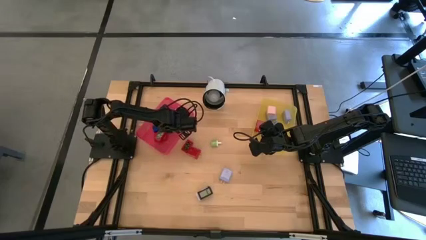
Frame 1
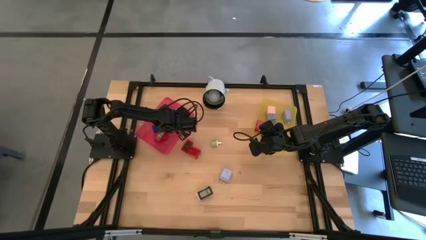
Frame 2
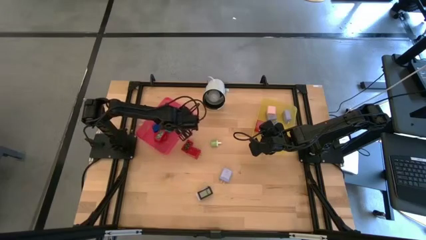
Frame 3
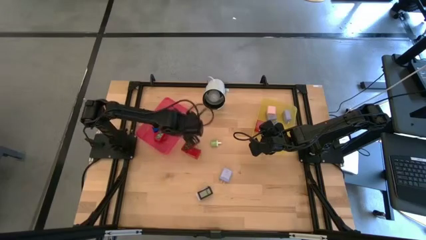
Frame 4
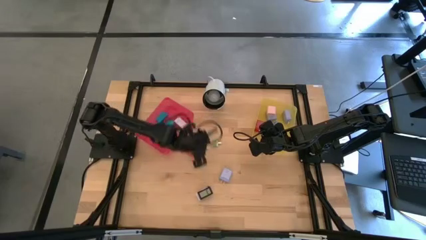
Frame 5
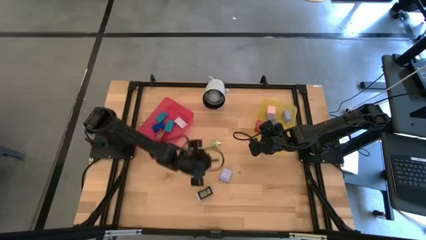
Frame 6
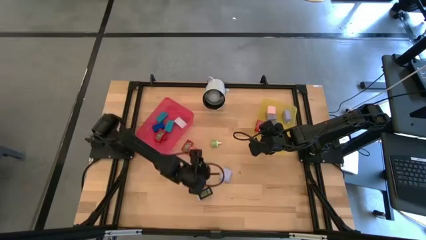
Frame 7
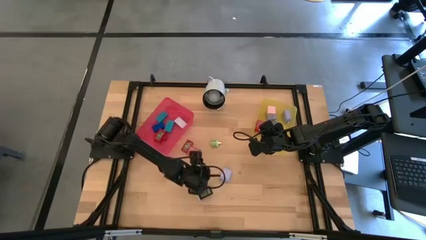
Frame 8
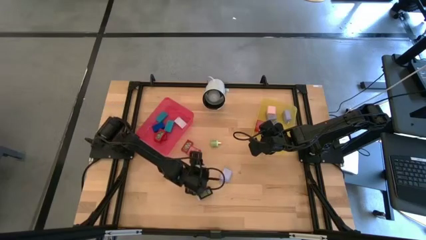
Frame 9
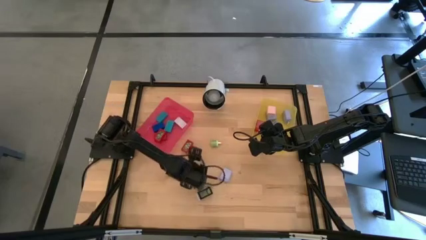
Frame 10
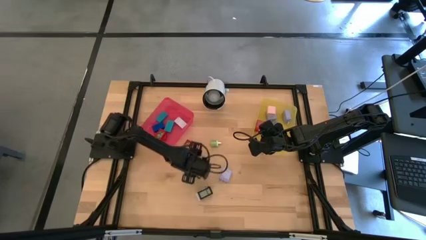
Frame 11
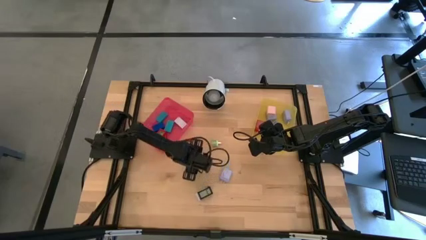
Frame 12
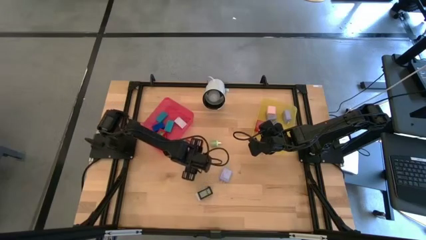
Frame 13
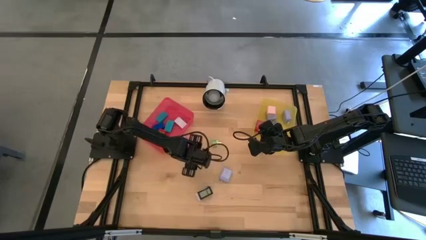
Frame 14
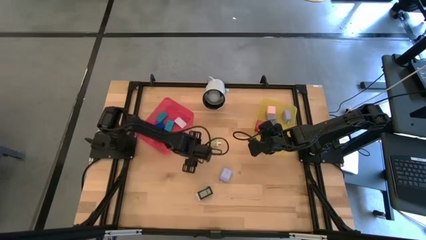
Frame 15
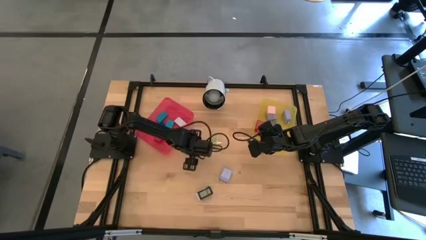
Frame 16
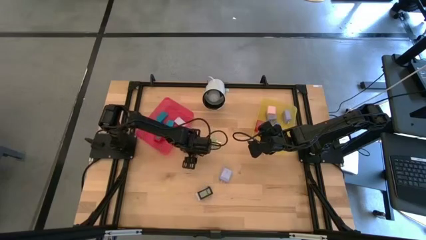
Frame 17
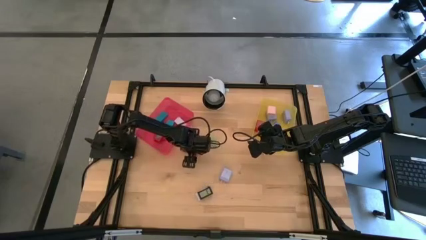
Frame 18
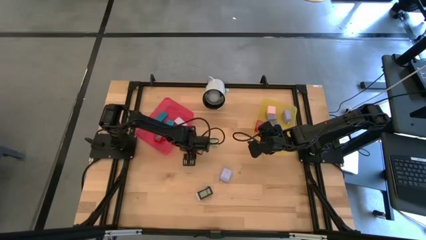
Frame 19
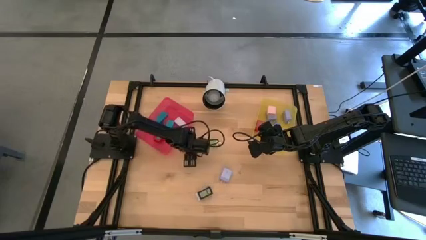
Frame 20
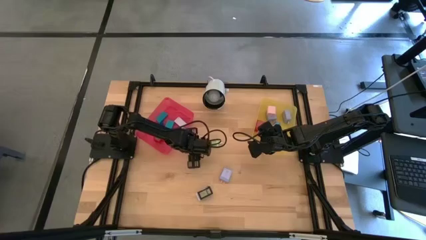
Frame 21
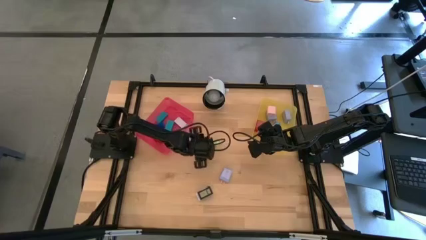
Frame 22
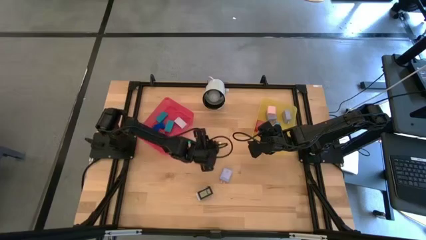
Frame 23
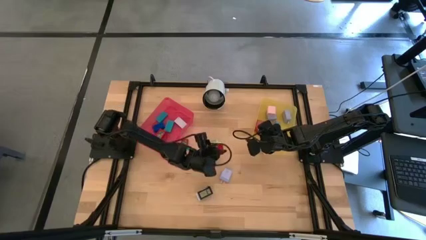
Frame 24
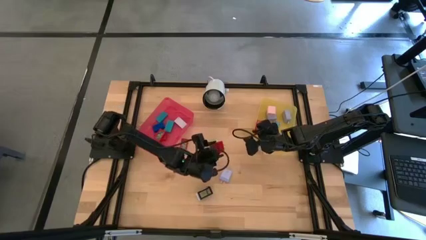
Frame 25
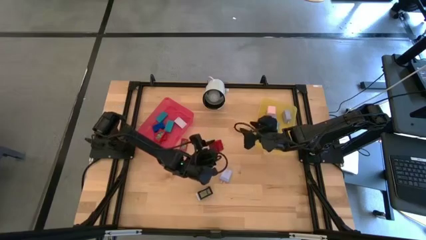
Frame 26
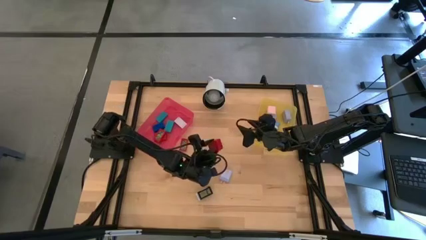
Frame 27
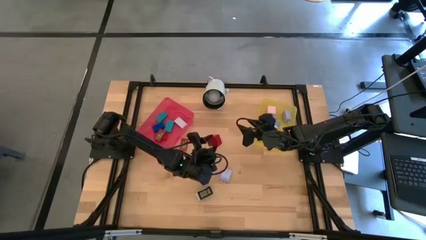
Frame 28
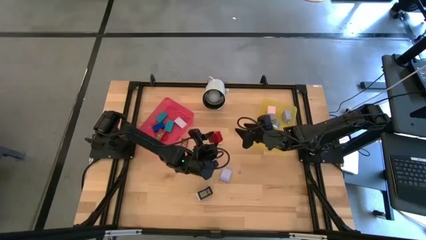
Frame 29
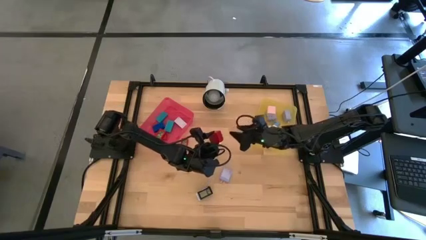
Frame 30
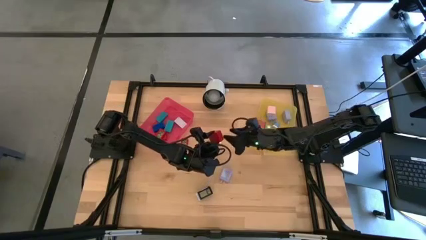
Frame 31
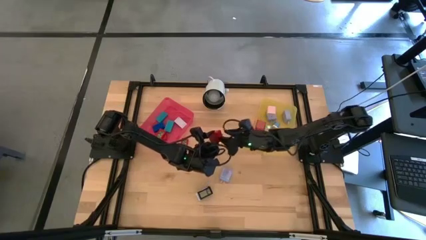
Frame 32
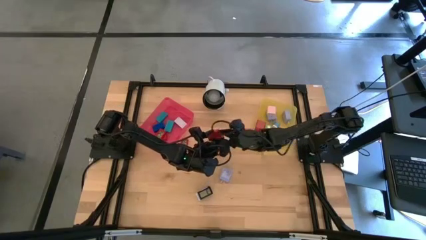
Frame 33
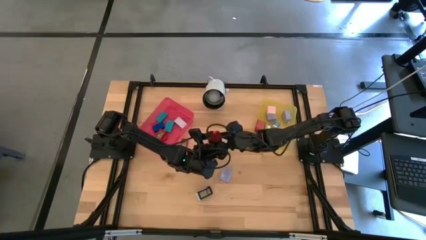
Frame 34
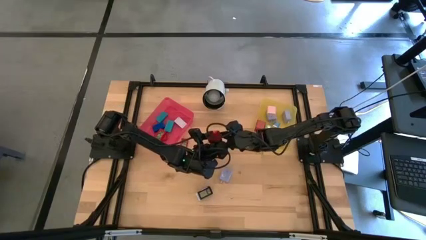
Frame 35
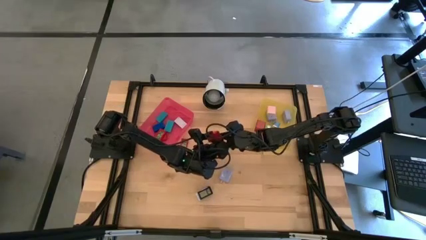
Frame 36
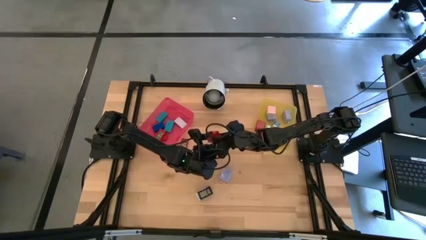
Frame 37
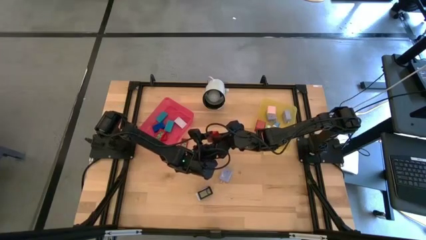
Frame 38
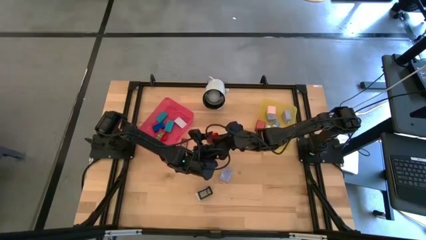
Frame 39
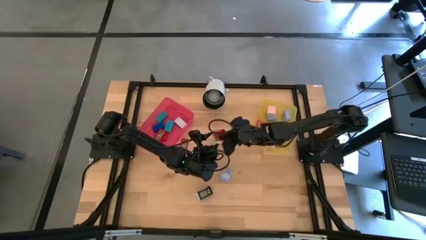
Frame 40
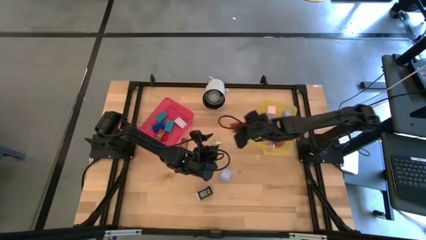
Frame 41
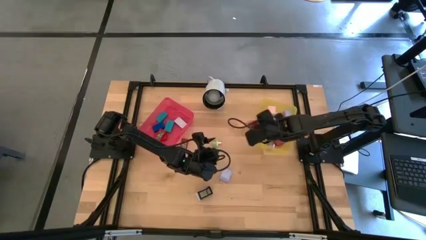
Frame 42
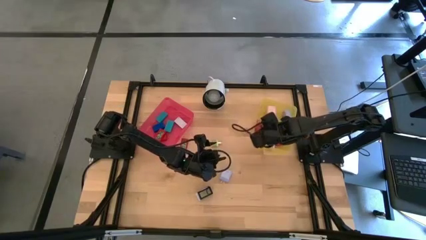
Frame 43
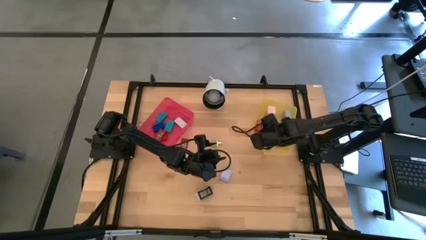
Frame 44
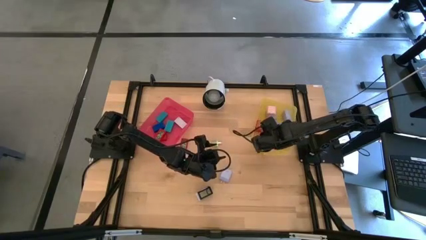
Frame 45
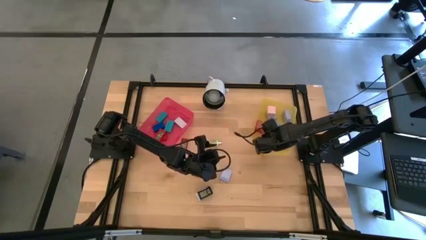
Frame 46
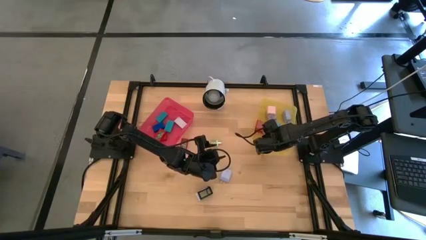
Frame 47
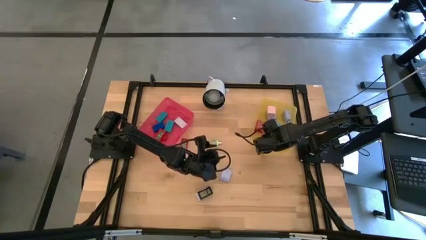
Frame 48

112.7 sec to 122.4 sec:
Task: Pick & Place Office items
Put the red charger adapter into the yellow bin

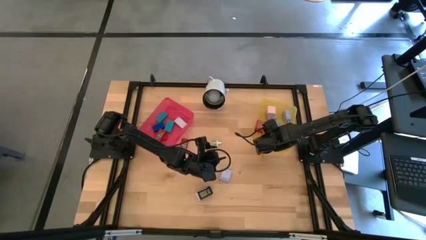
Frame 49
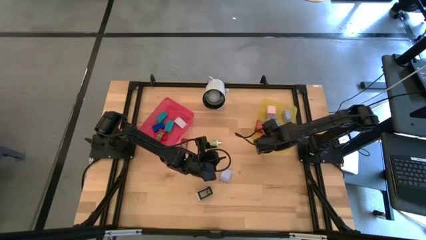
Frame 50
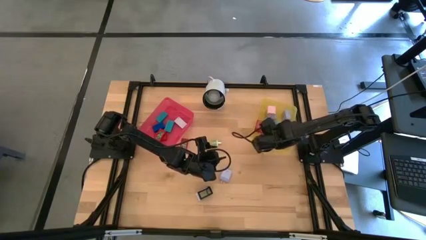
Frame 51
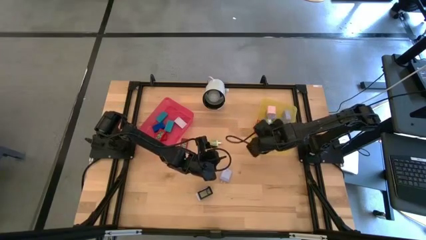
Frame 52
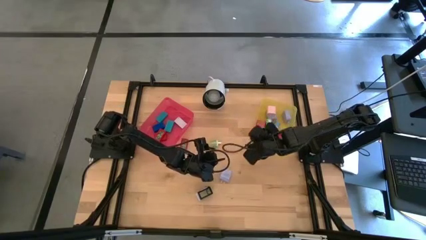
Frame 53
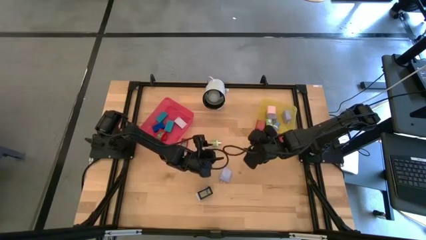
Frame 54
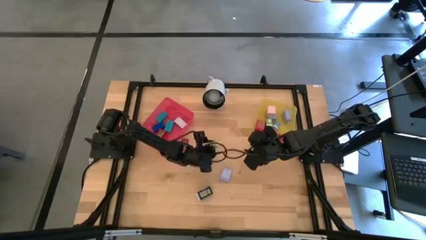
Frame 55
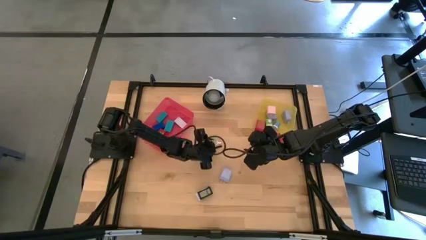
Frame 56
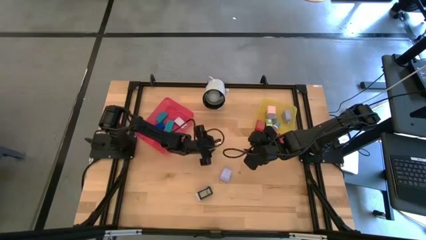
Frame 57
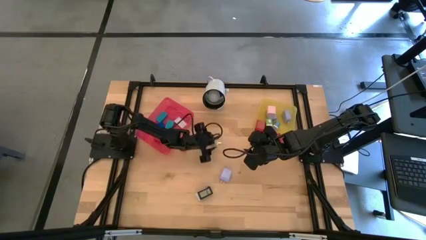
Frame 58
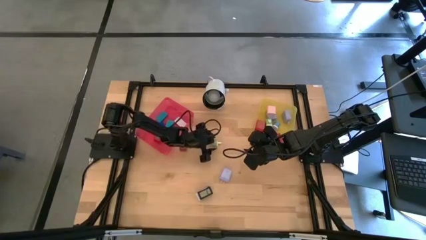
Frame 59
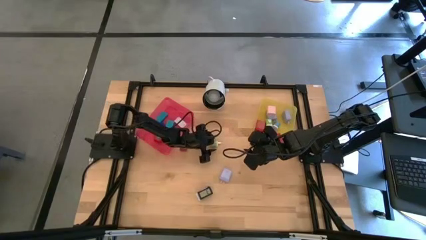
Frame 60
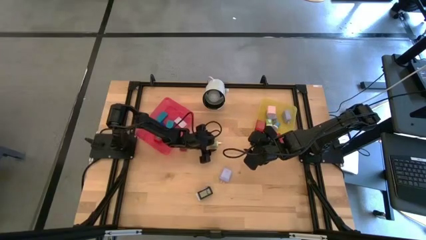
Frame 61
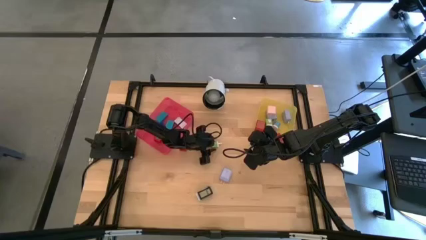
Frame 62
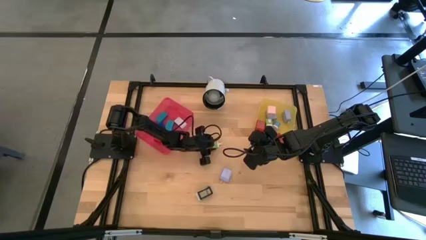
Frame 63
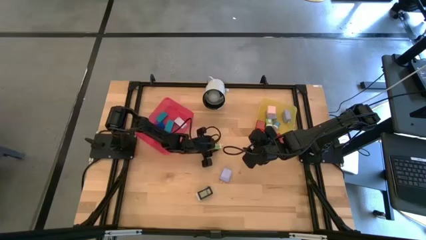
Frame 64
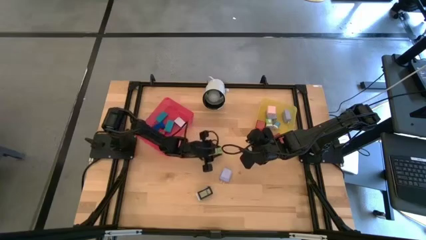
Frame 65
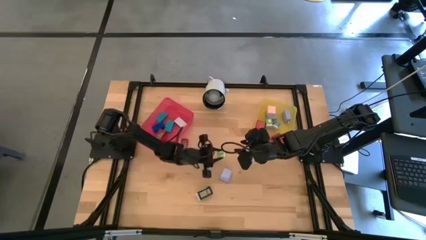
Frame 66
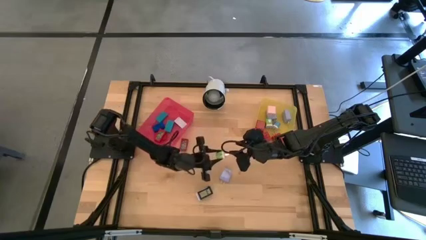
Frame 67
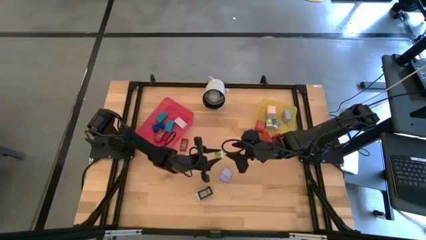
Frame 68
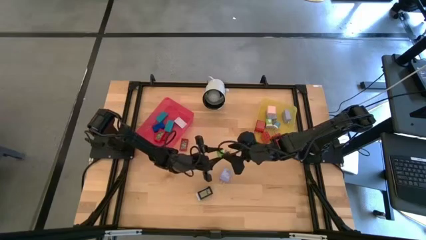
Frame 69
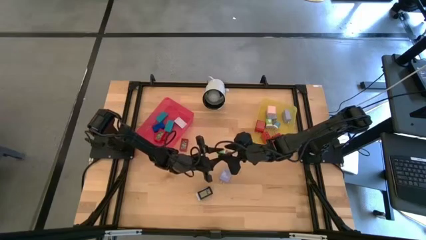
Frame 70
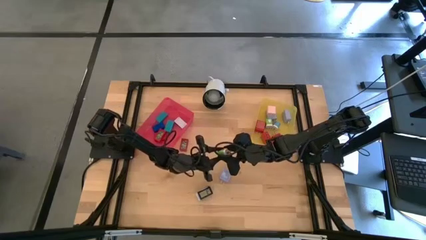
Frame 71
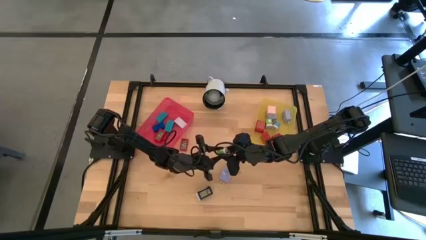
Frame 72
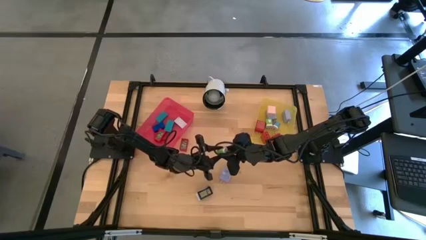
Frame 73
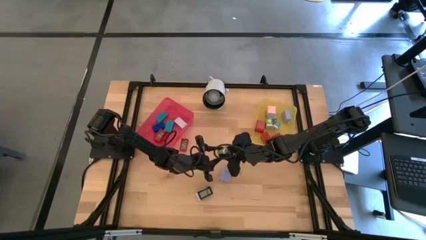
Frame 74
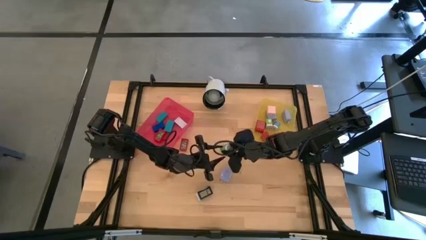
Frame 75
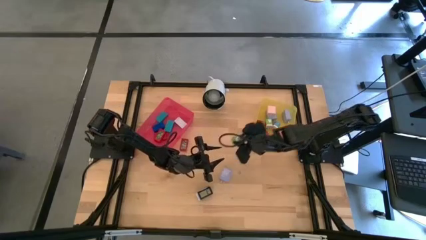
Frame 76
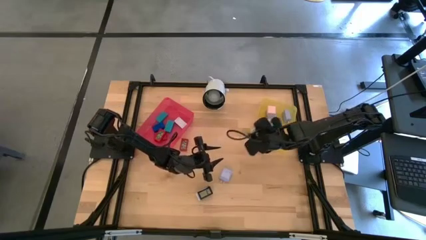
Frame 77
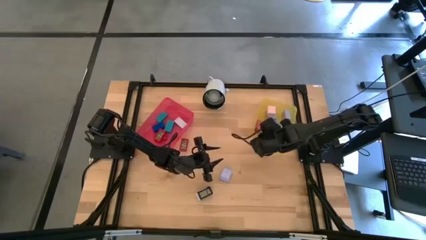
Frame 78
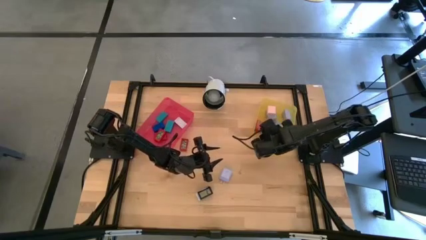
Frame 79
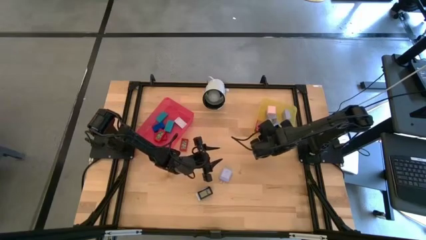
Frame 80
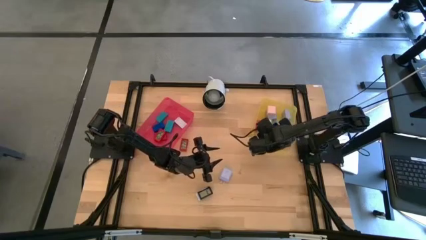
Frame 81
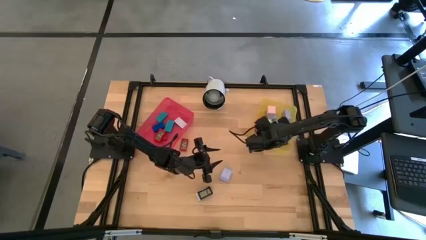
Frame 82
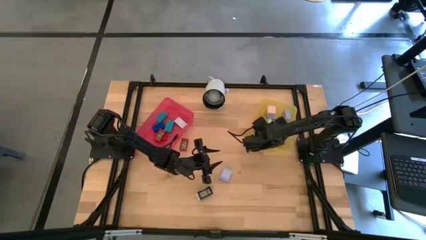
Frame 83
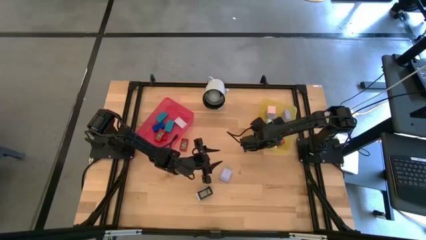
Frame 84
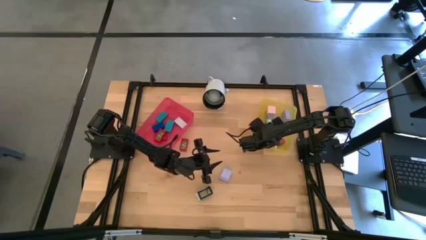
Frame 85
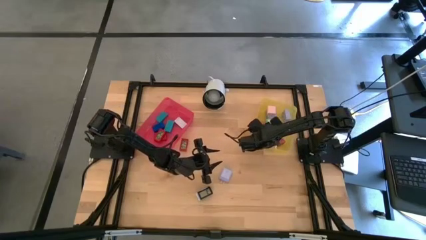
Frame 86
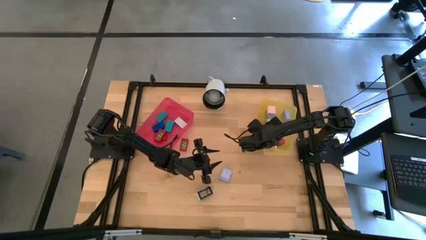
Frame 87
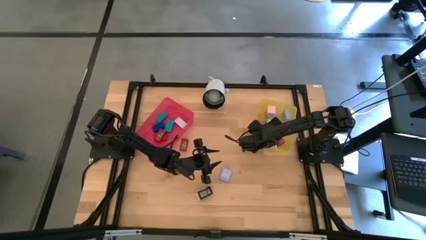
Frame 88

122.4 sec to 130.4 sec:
Put the light green small charger adapter into the yellow bin
